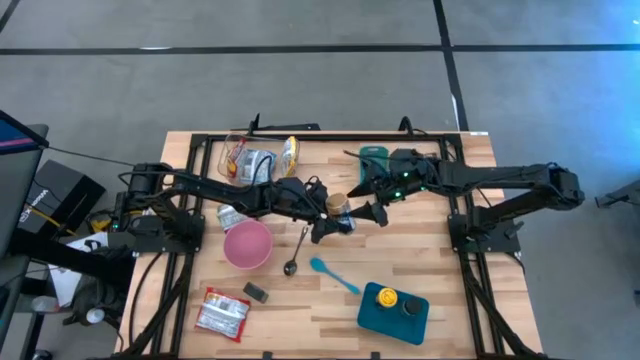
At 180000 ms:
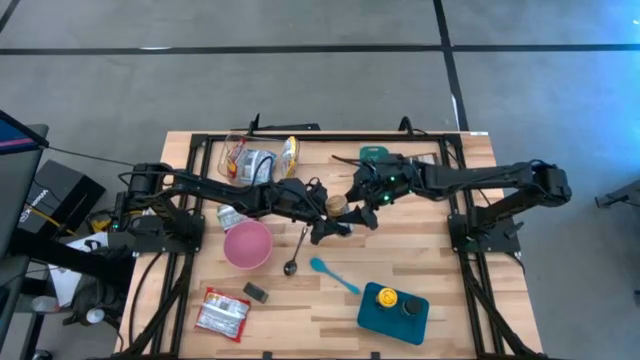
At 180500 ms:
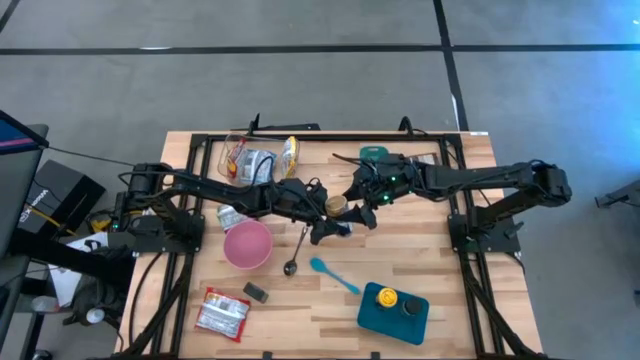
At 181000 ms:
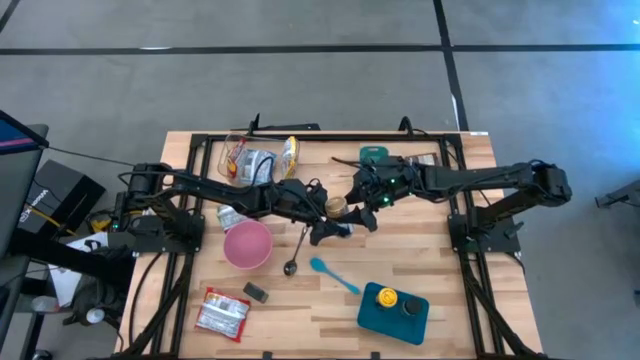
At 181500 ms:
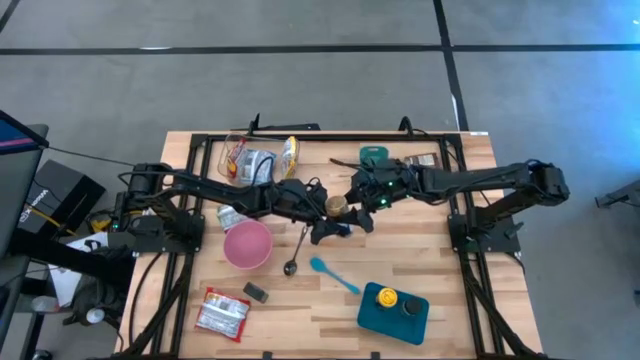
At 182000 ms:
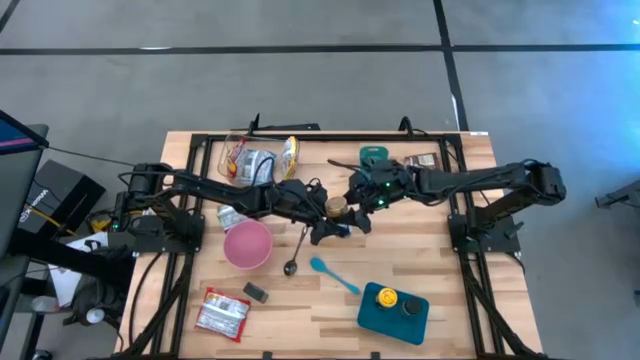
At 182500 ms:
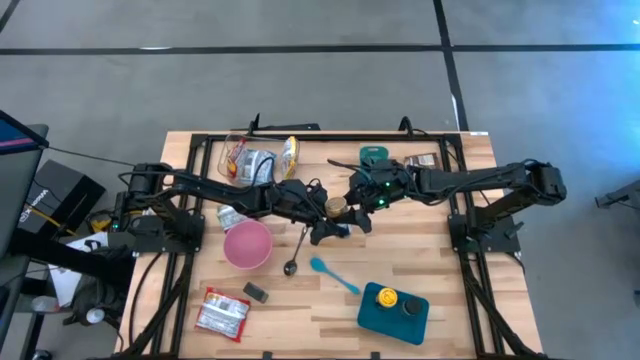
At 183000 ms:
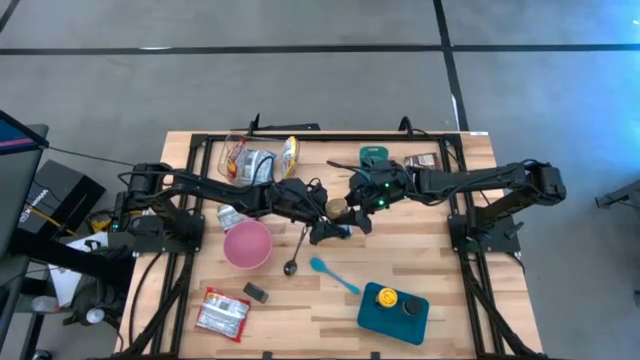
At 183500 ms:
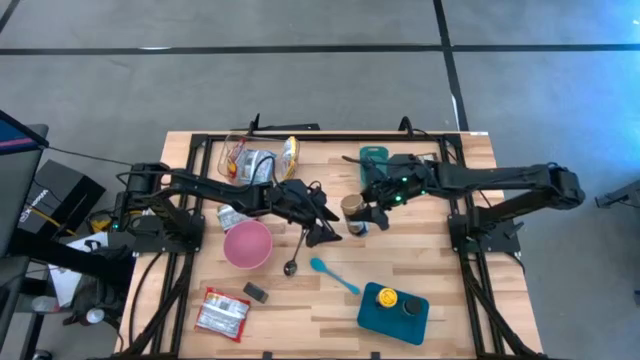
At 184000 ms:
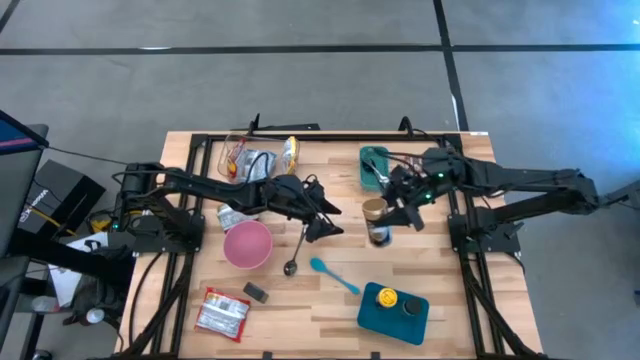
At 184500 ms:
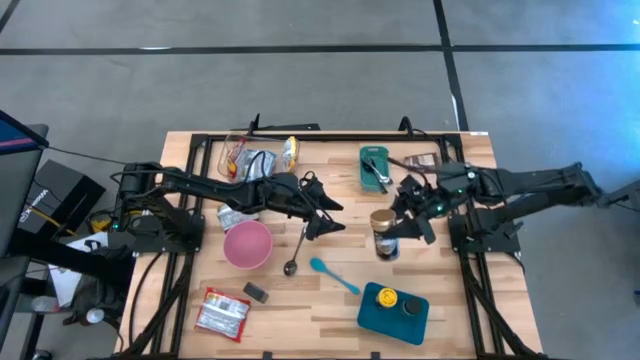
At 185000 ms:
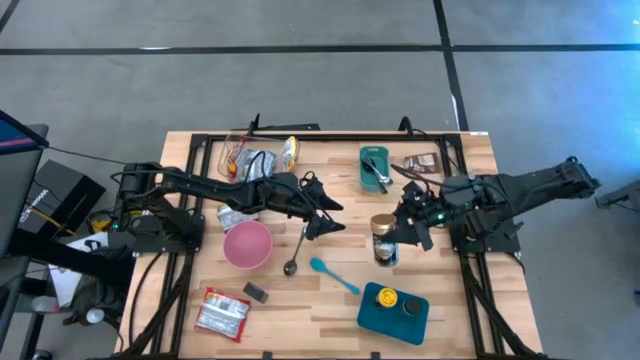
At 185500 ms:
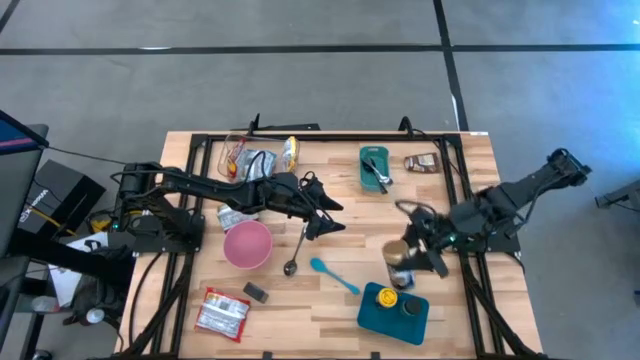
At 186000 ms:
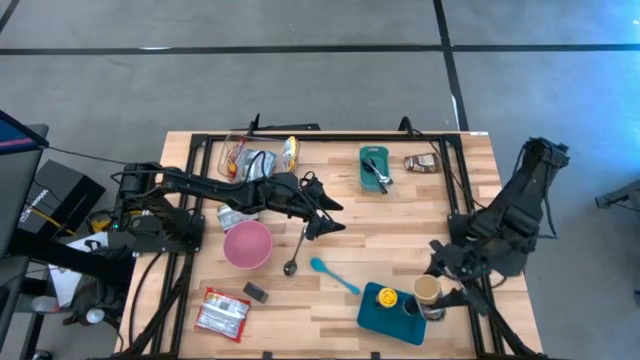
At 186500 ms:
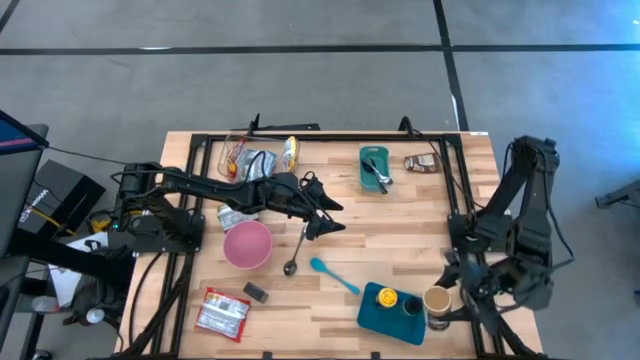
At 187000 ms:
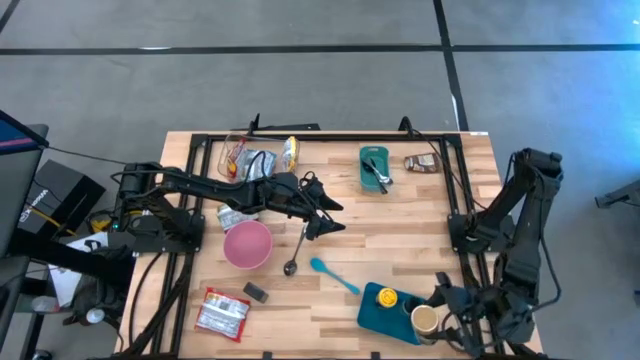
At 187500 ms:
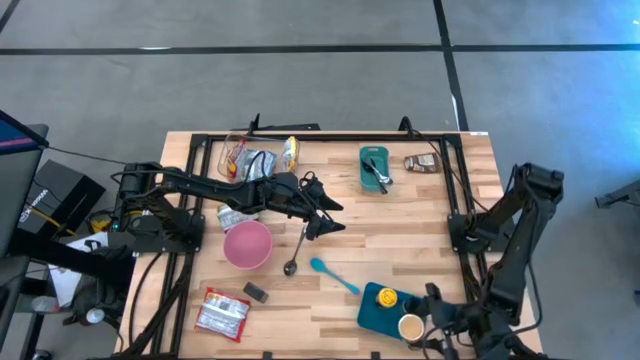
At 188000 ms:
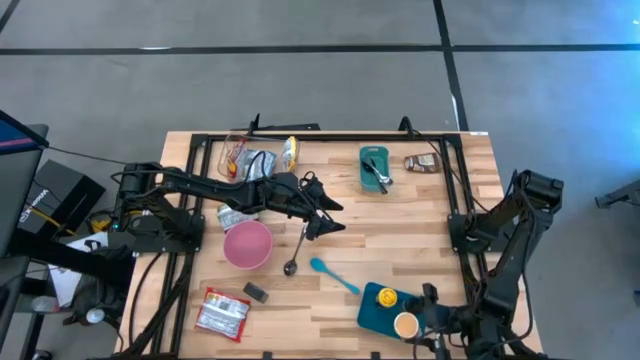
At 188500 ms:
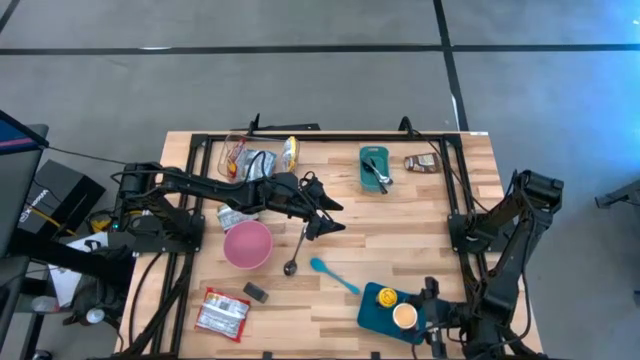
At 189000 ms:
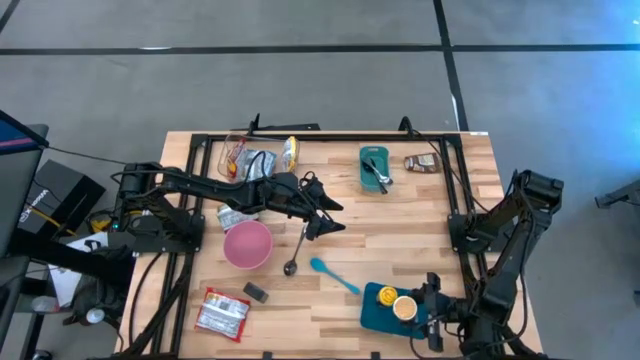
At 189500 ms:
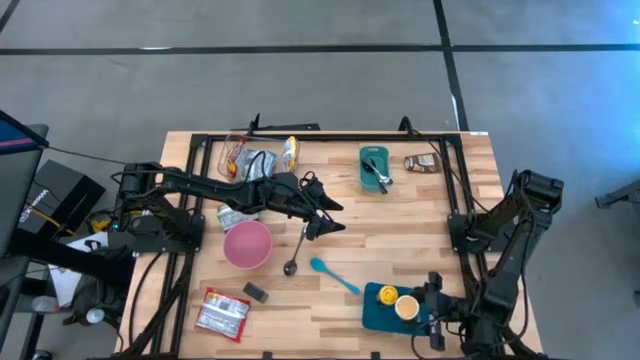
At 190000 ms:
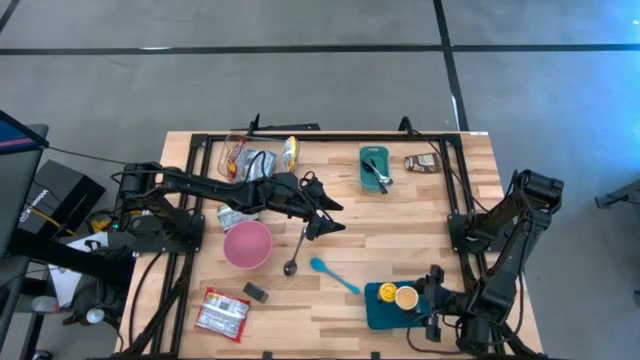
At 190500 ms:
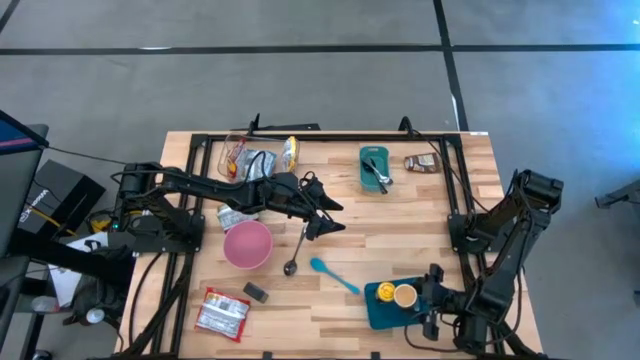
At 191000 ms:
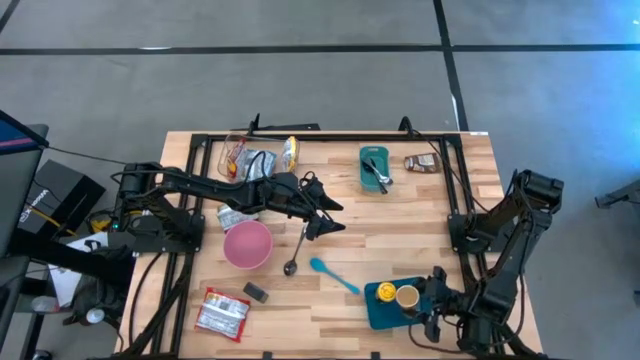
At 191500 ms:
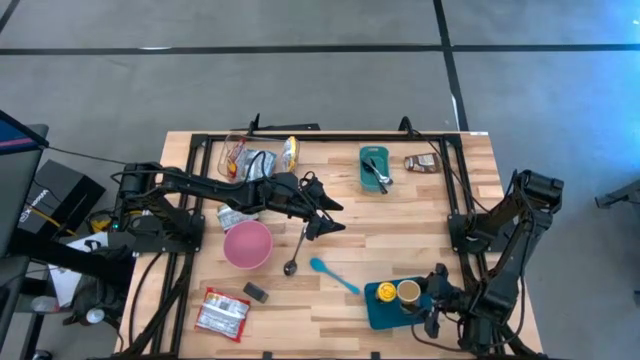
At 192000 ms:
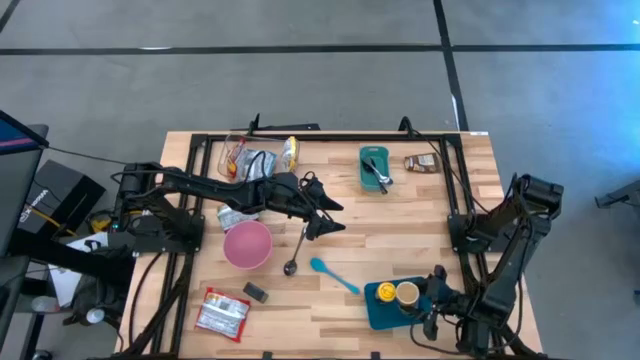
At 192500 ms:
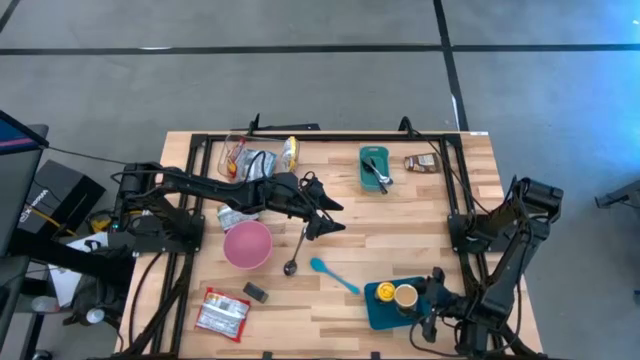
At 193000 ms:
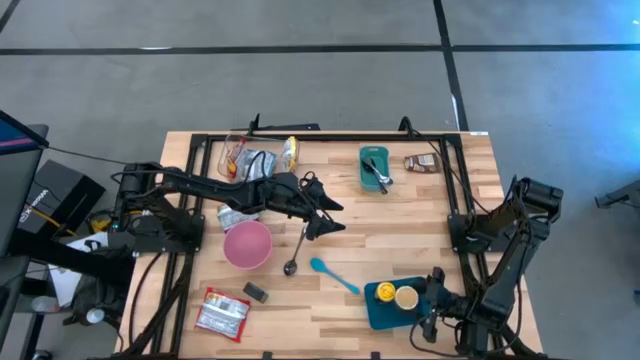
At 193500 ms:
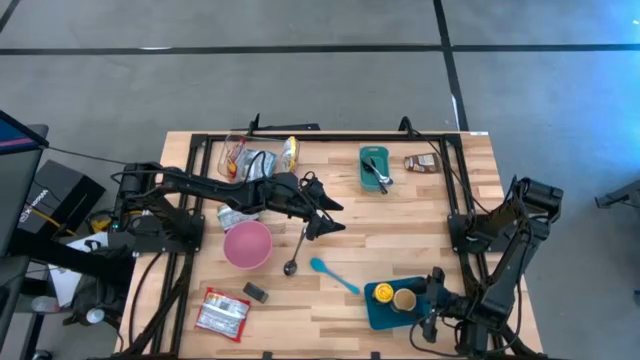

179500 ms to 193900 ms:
Task: Pick & Place Food Item
Put the gold seasoning bottle into the blue bin

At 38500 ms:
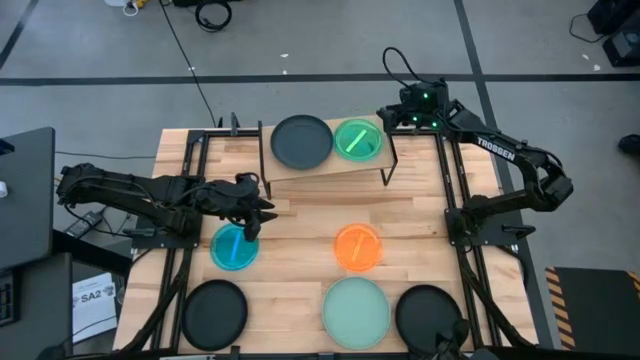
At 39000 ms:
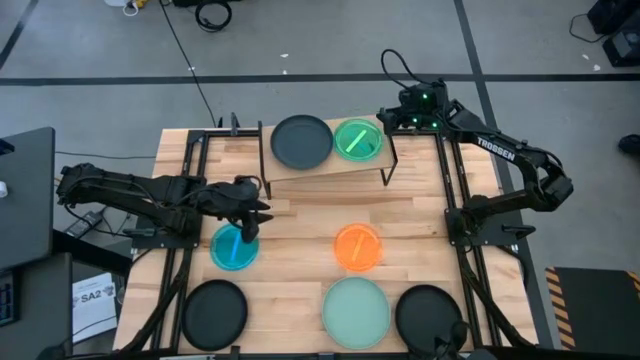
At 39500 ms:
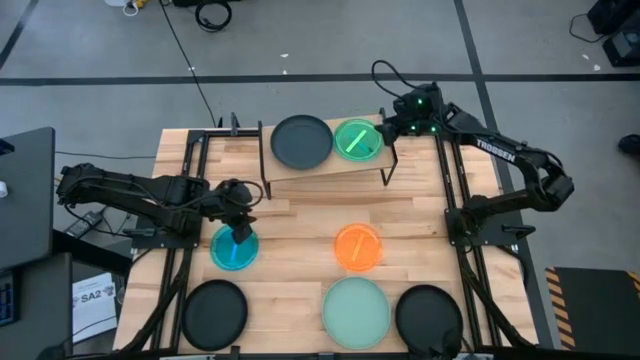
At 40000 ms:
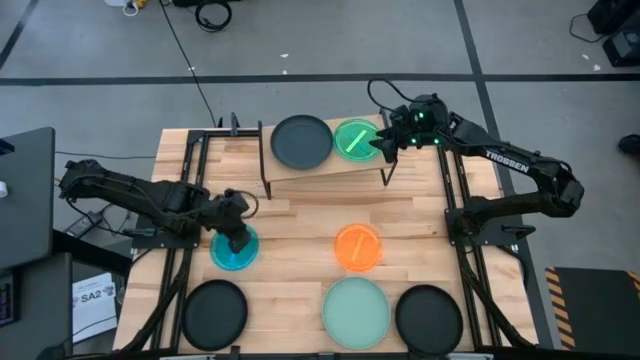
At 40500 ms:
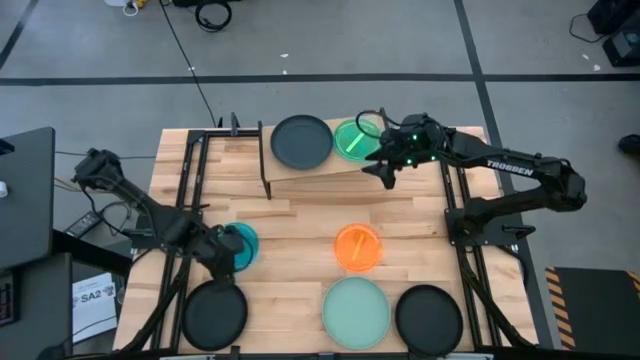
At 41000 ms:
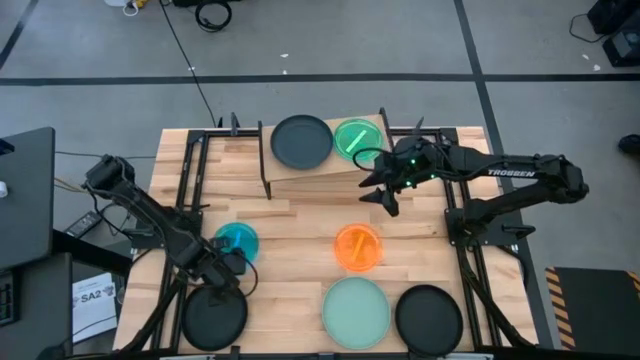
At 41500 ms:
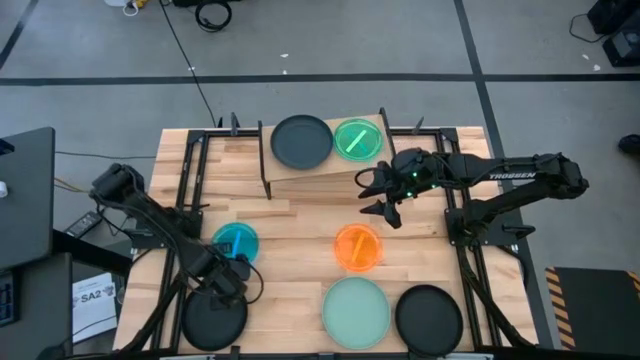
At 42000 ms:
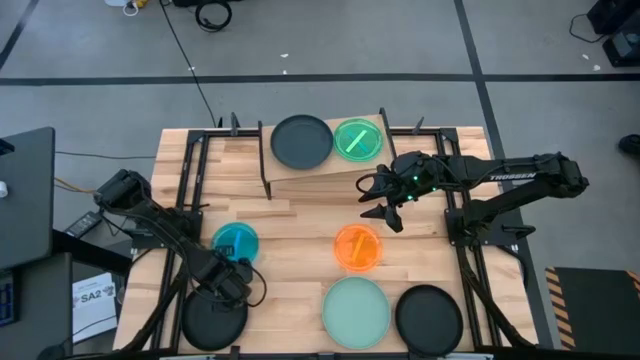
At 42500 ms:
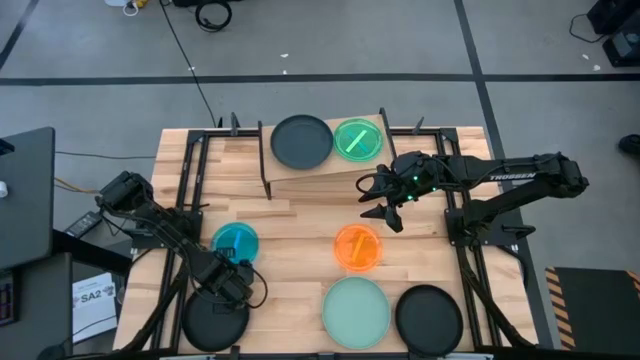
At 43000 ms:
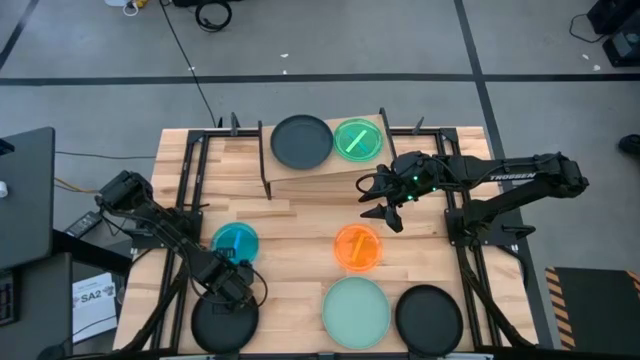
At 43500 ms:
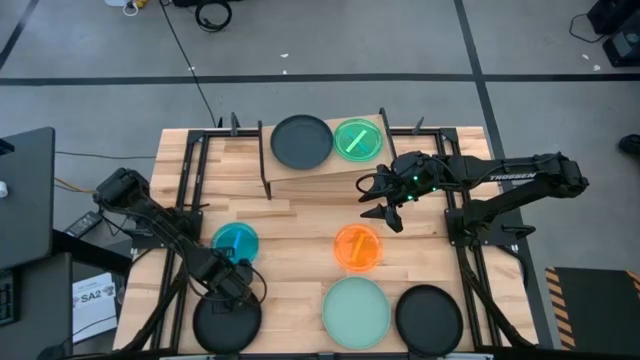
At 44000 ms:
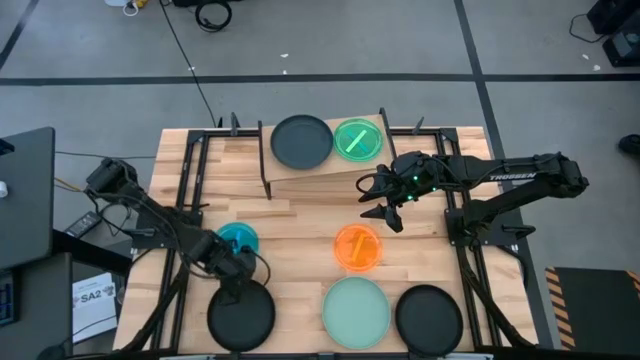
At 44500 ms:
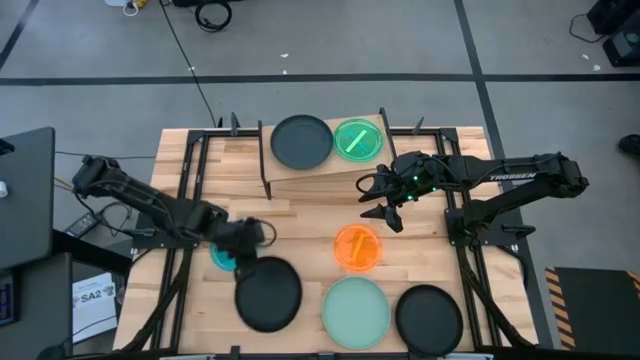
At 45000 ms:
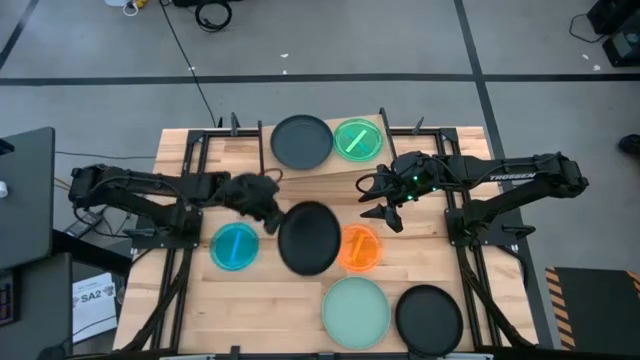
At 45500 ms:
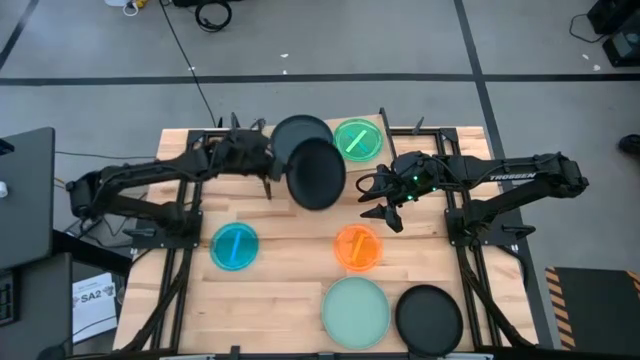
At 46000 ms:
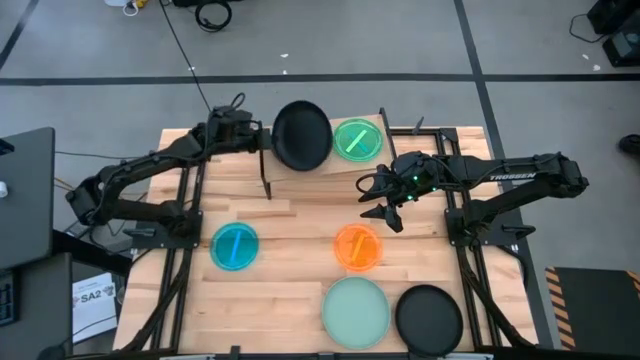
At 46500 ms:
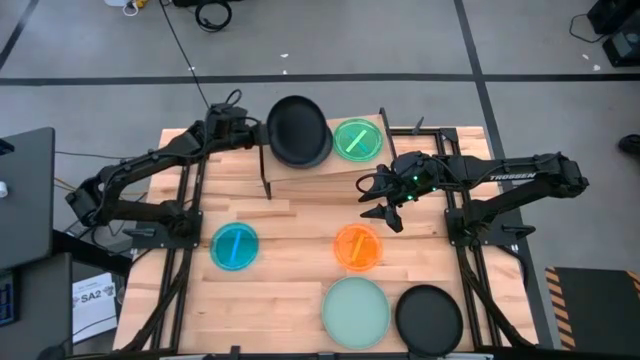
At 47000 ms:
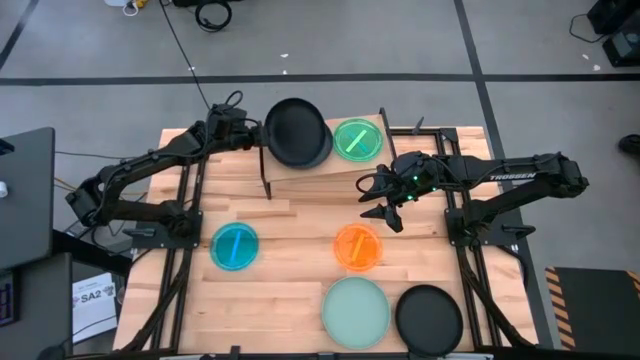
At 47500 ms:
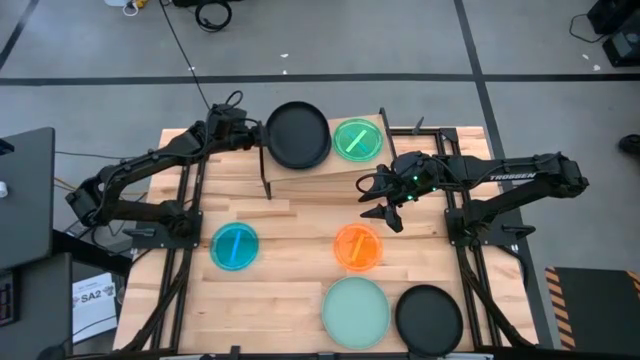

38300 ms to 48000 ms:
Task: Place and stack plates onto a shelf
Stack the left black plate on top of the dark blue plate on the shelf
